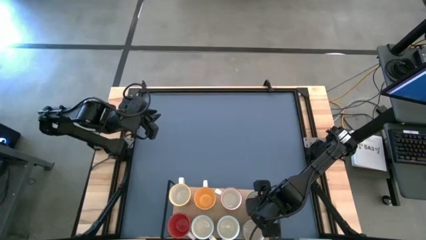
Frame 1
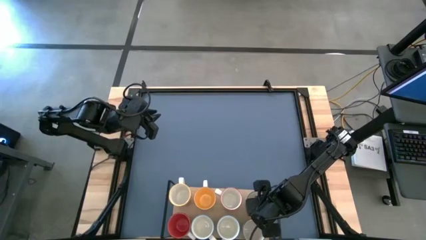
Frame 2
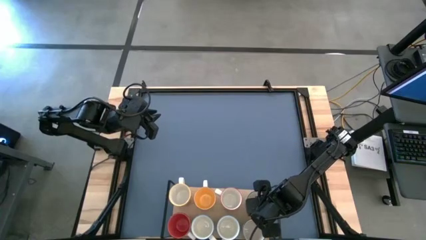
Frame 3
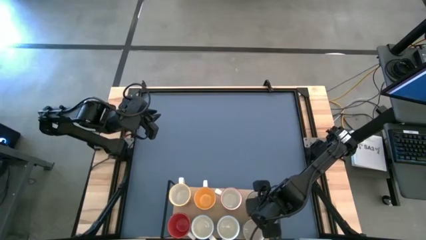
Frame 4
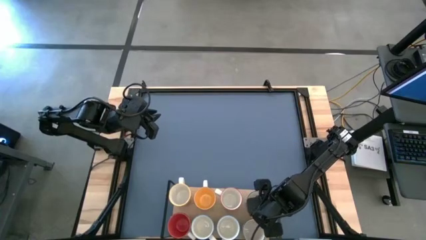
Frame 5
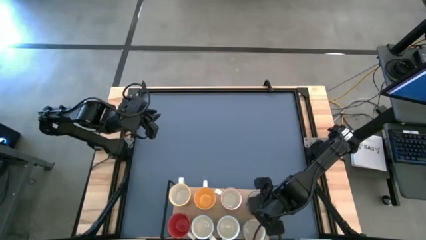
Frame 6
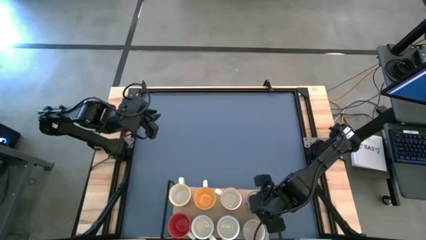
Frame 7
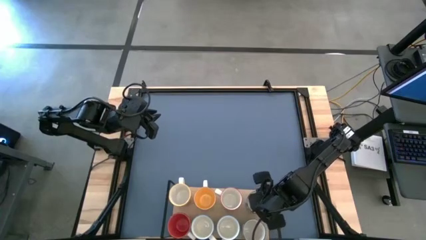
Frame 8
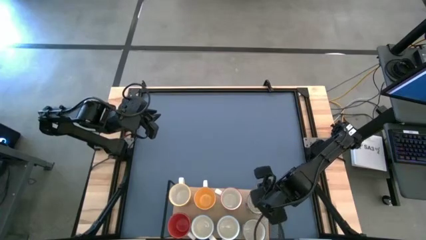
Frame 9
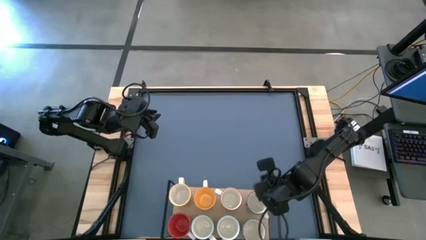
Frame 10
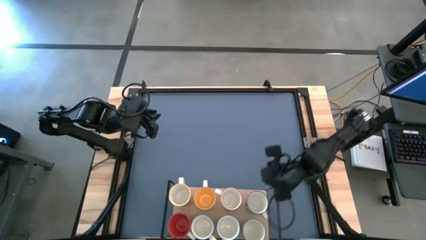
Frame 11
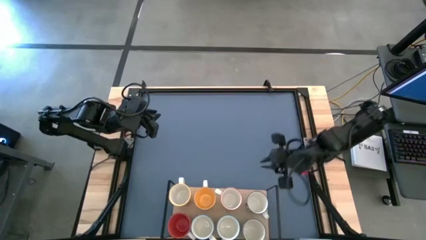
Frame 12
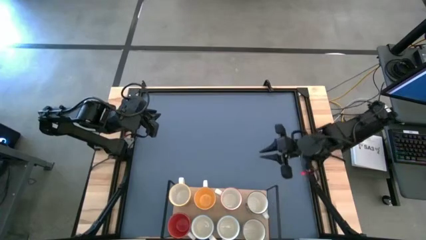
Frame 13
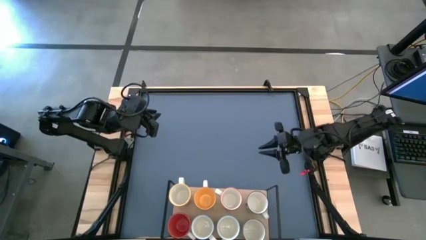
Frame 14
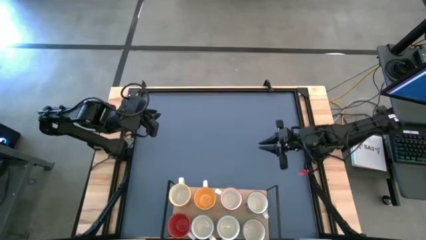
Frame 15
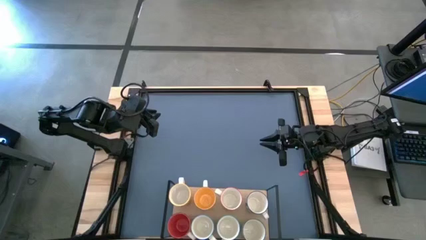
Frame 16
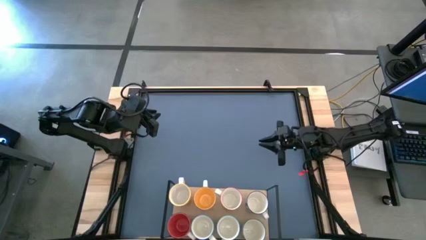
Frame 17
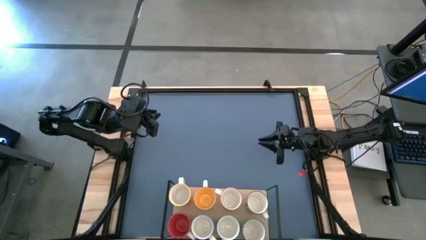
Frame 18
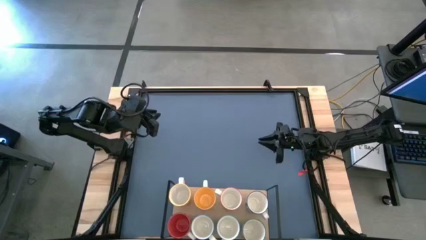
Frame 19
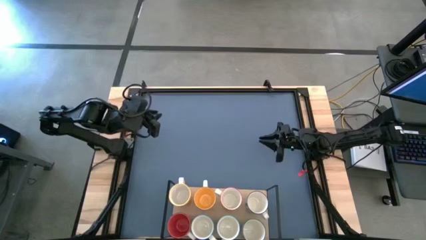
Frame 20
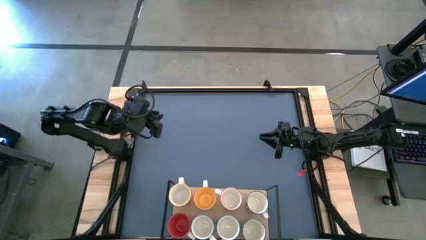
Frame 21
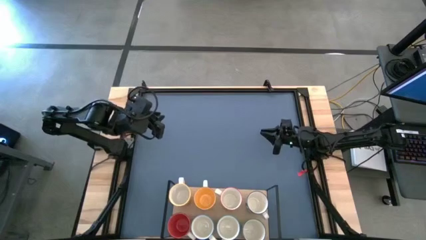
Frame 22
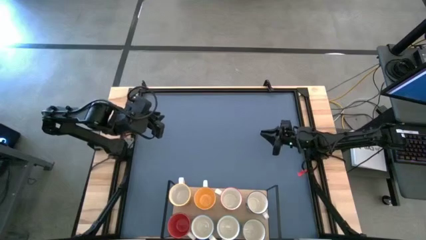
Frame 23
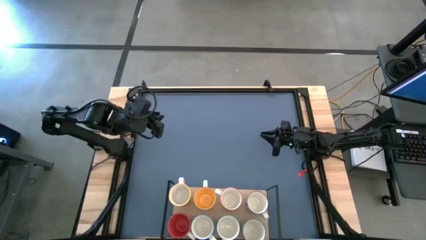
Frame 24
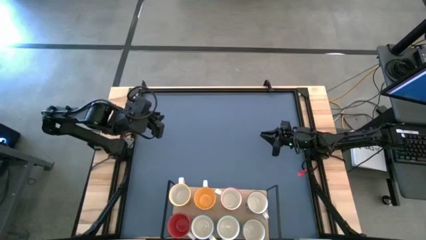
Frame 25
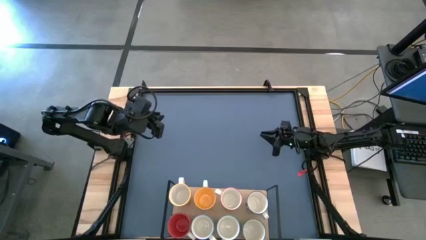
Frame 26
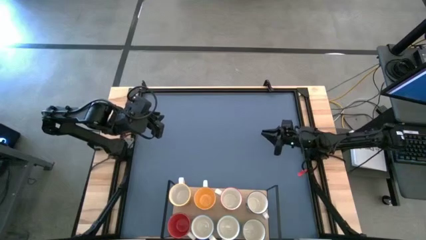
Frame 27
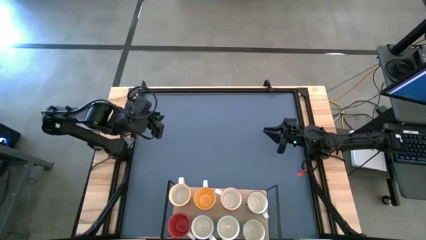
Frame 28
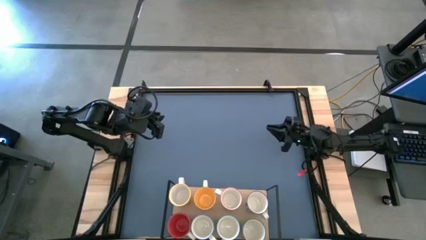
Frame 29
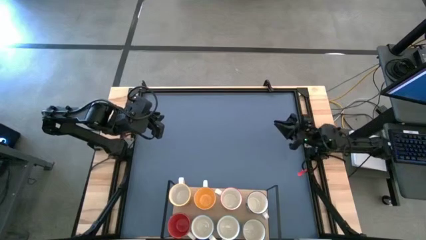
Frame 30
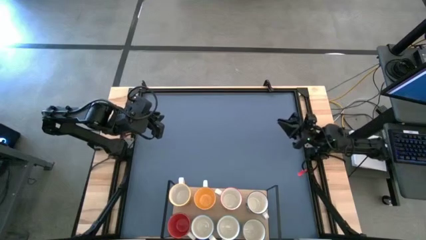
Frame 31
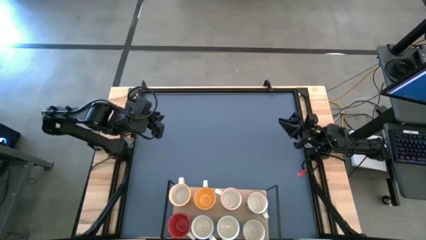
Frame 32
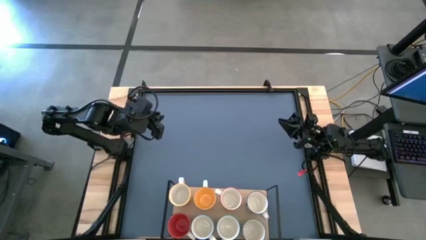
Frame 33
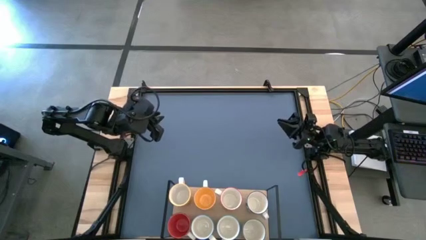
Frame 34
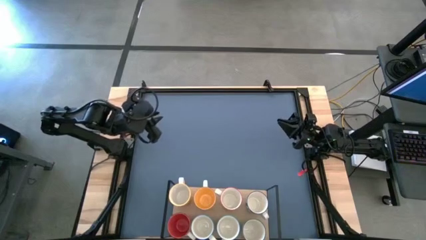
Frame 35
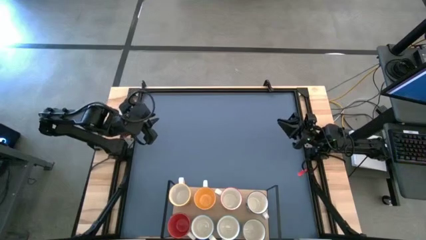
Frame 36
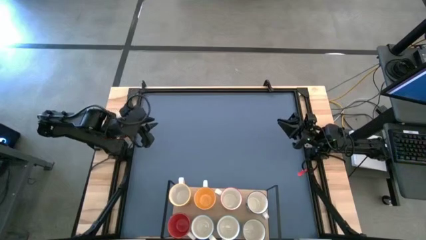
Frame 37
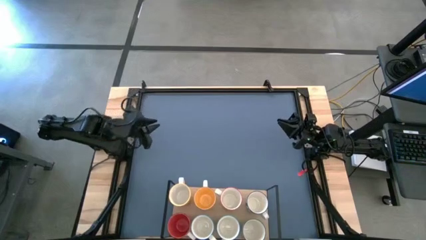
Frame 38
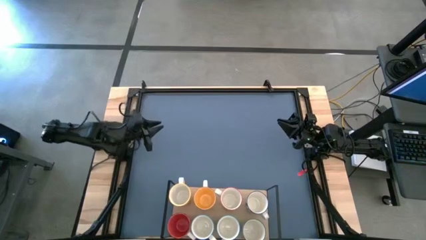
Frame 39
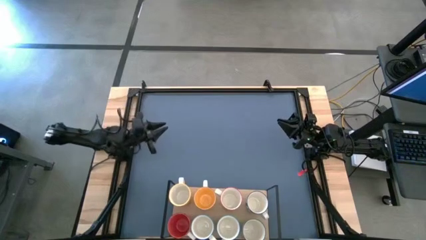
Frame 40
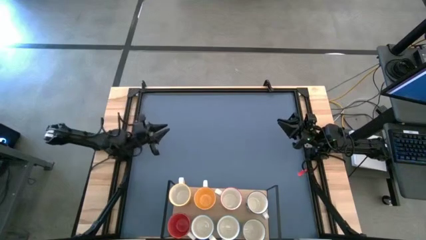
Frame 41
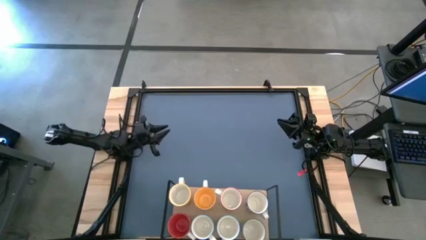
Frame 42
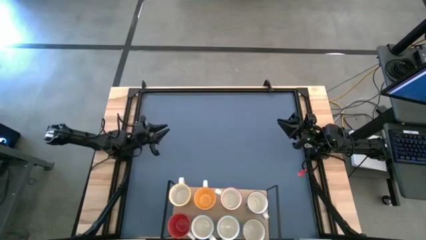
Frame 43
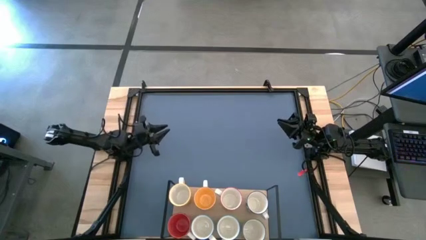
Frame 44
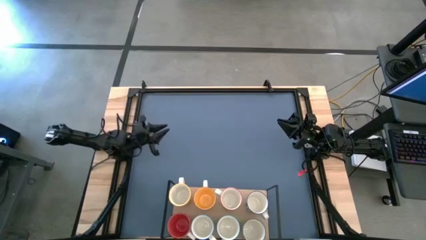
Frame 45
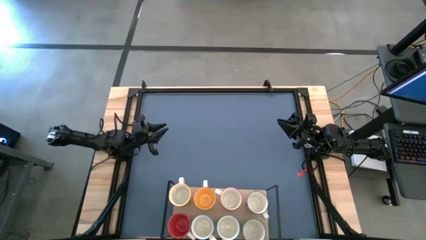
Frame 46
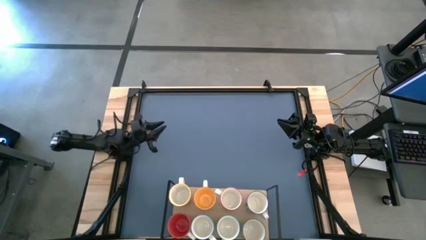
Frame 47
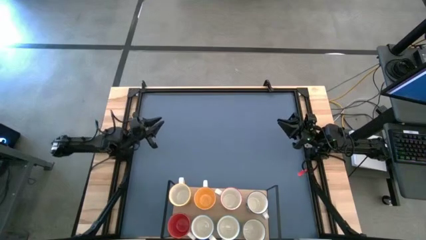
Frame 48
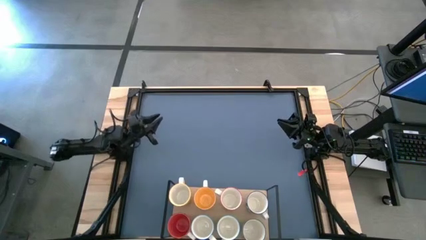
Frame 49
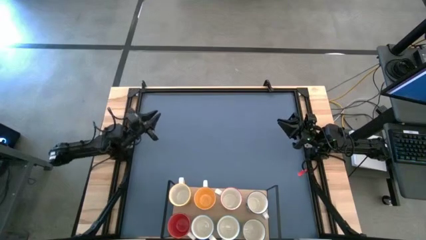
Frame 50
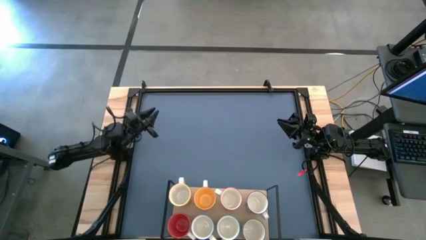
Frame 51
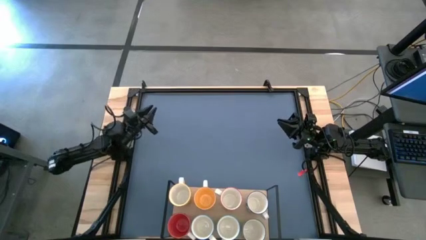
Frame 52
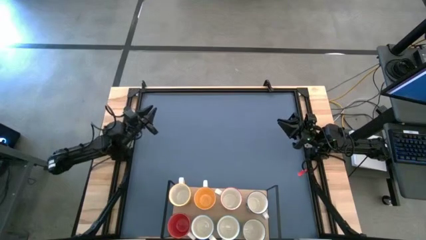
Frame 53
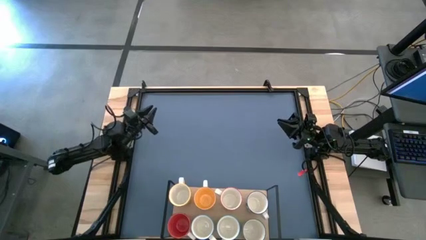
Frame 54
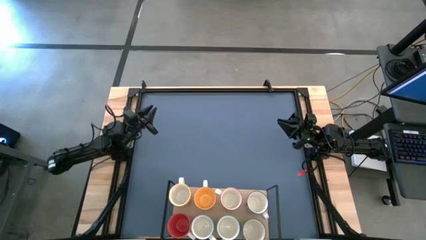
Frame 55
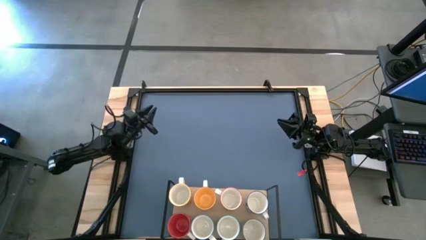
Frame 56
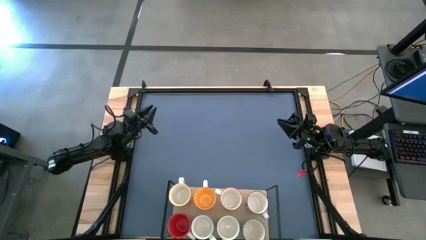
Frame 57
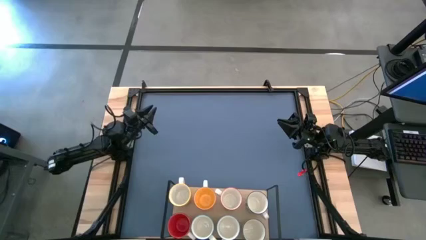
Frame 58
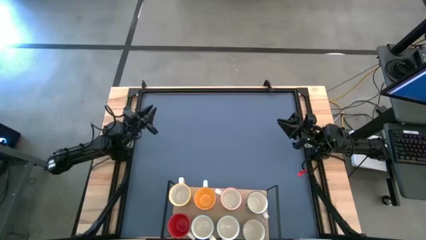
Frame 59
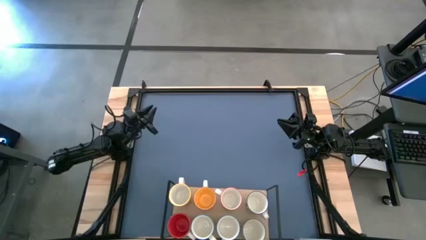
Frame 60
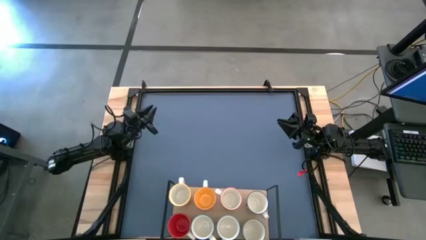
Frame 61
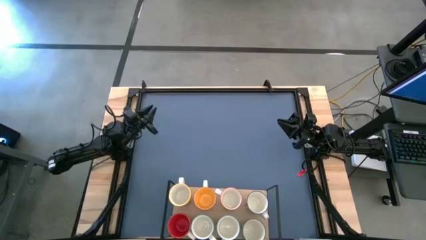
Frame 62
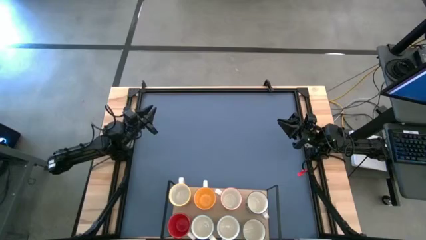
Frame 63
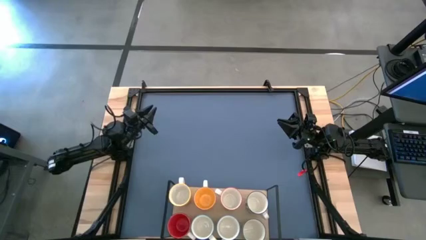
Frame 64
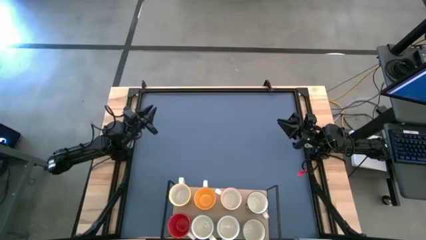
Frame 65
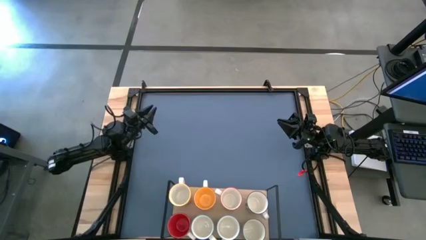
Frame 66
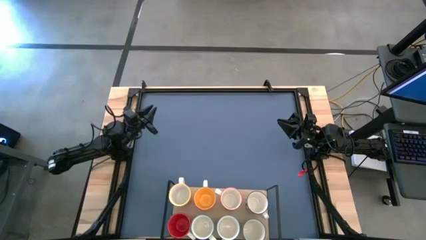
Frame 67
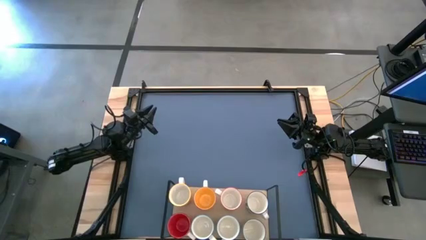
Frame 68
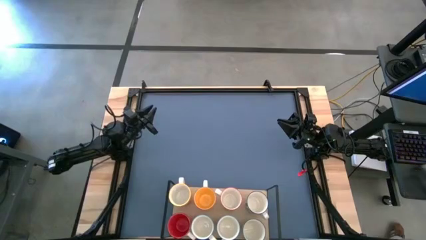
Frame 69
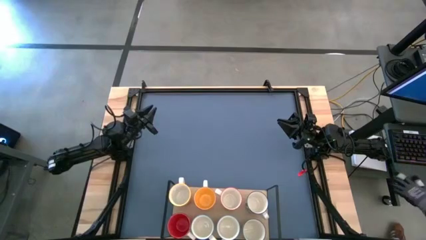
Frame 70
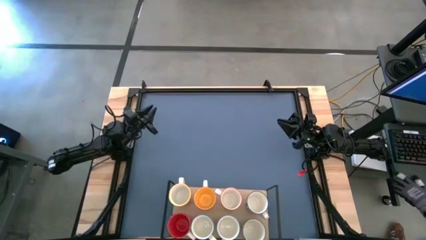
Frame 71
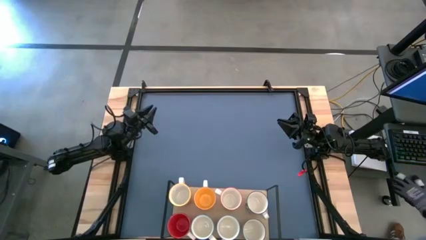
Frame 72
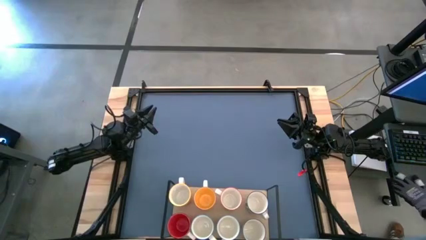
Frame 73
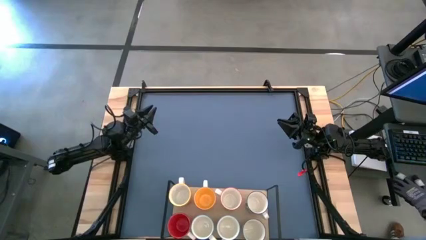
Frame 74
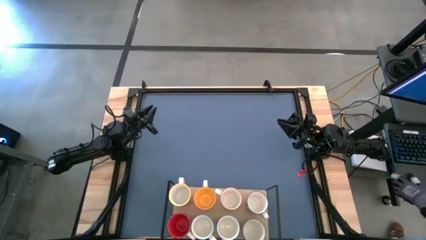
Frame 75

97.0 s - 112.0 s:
Task: Place coffee mugs
Return to Home Position
